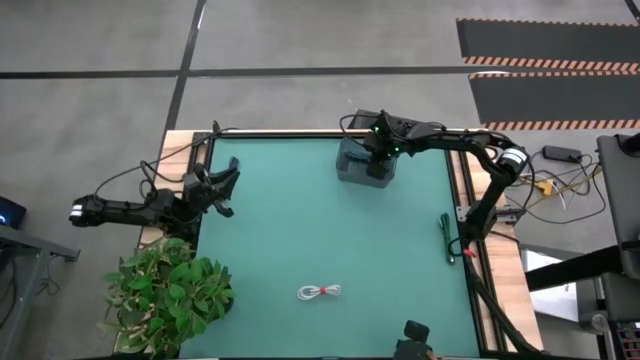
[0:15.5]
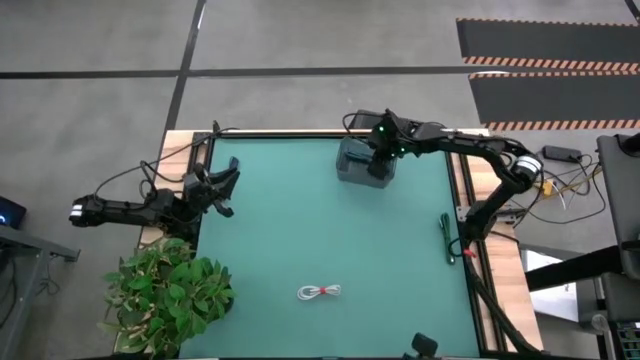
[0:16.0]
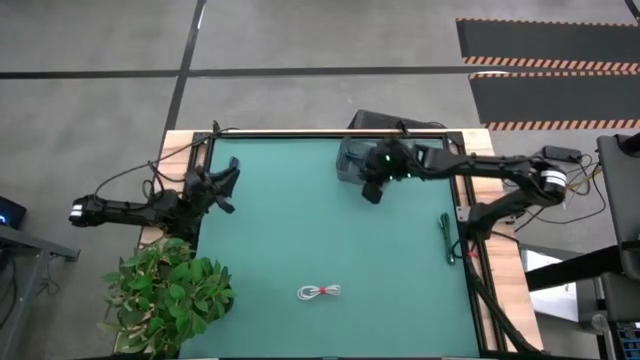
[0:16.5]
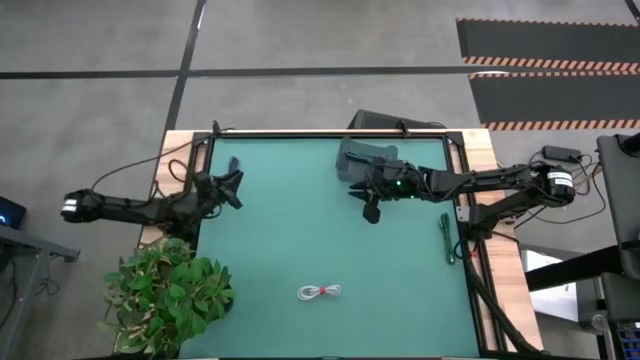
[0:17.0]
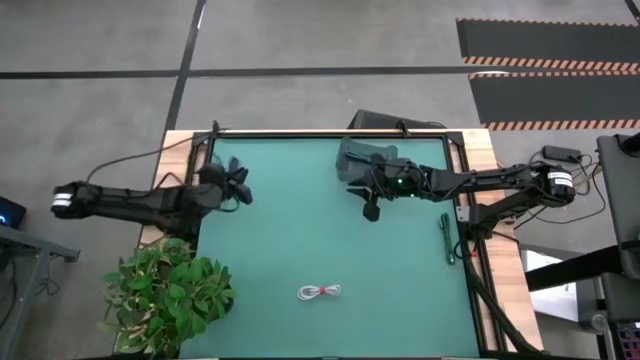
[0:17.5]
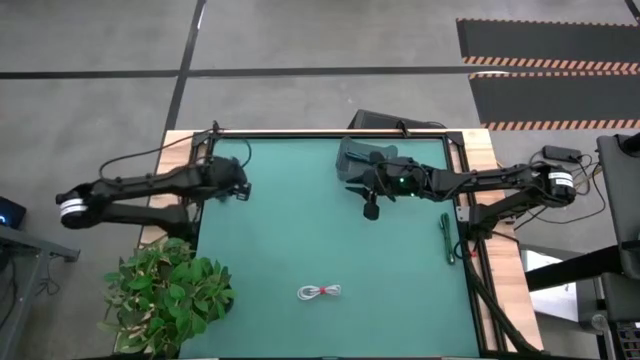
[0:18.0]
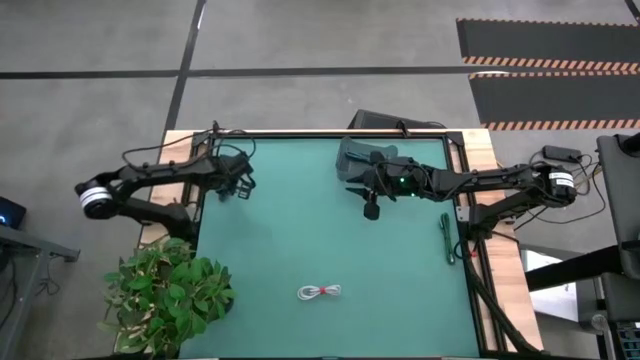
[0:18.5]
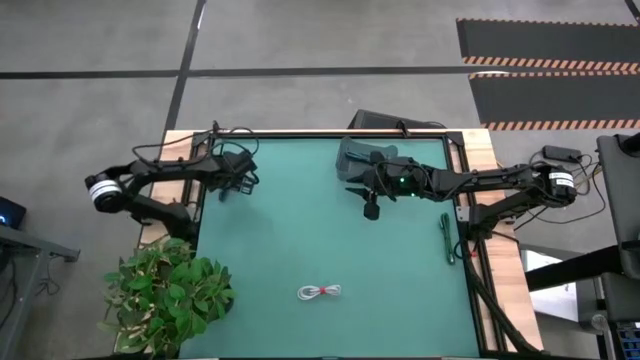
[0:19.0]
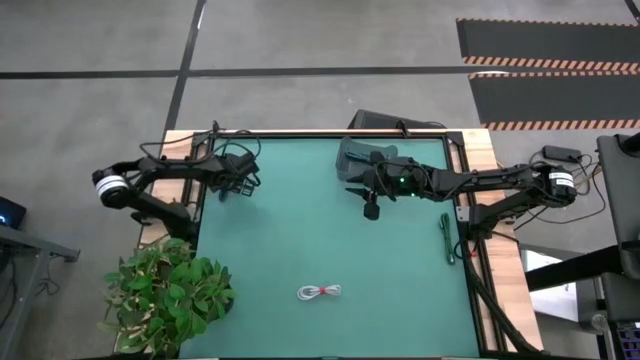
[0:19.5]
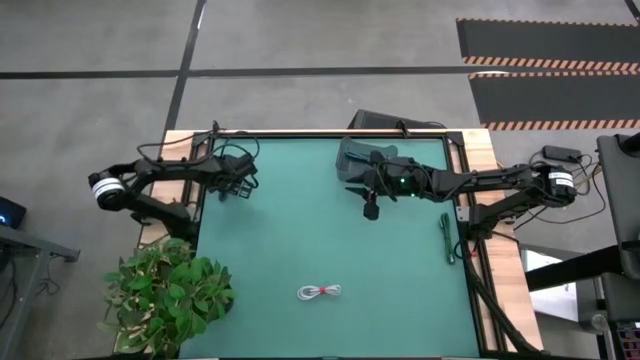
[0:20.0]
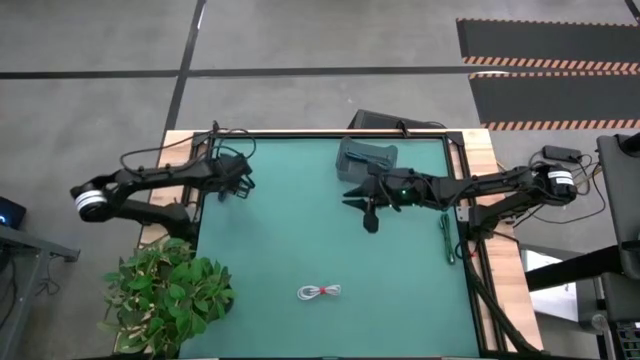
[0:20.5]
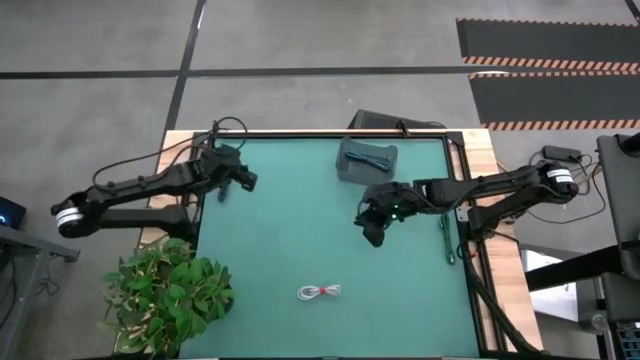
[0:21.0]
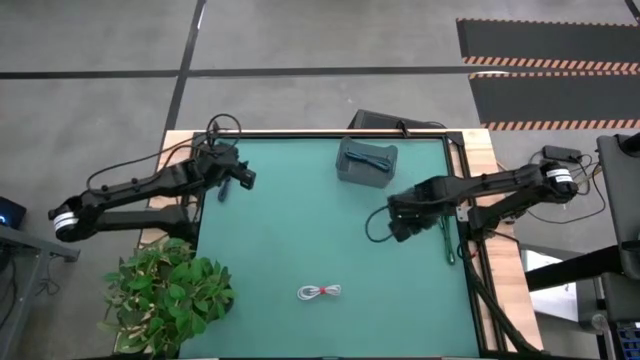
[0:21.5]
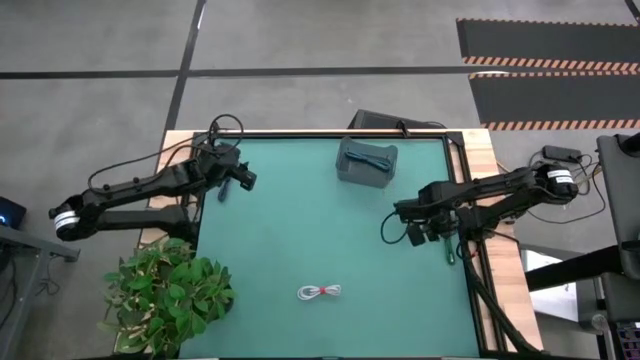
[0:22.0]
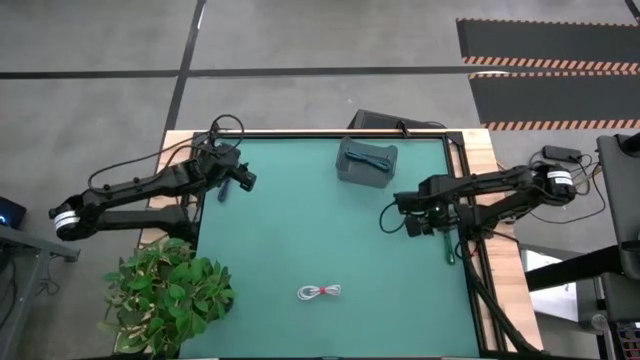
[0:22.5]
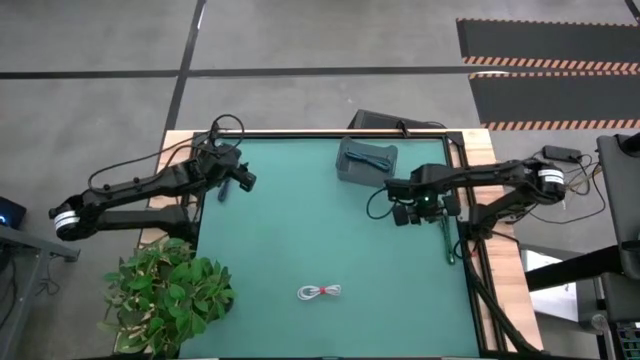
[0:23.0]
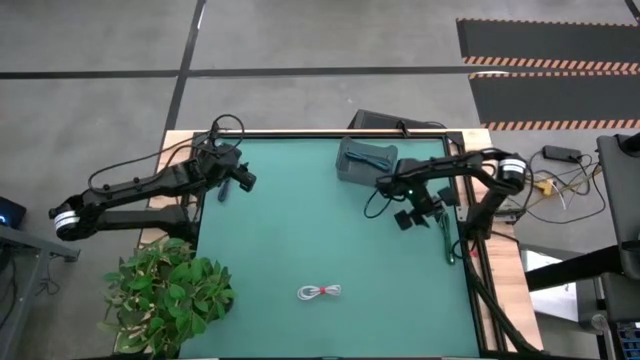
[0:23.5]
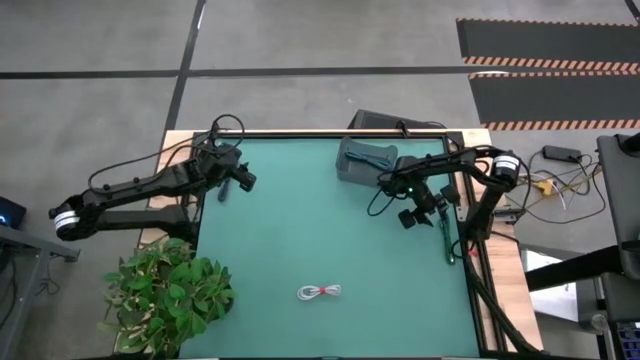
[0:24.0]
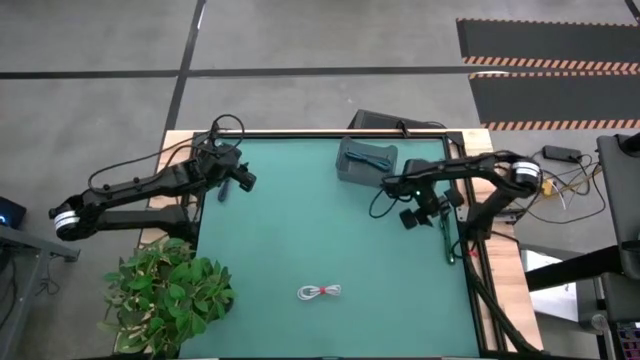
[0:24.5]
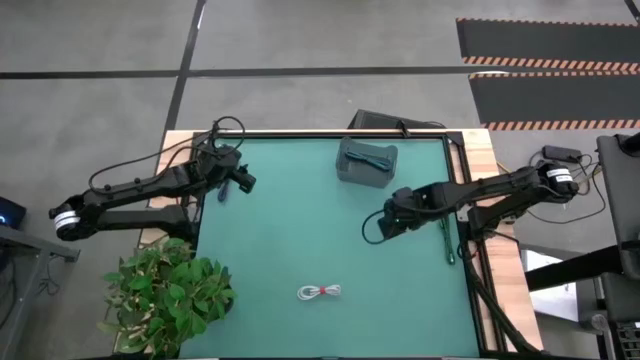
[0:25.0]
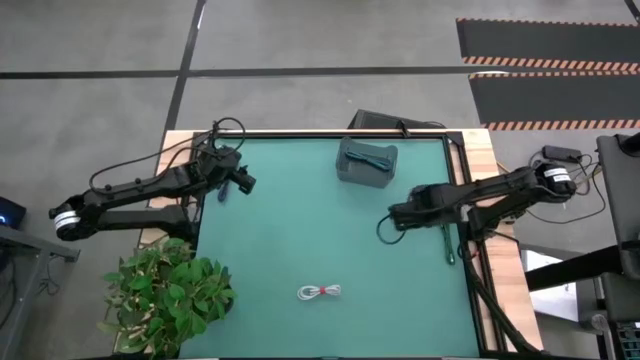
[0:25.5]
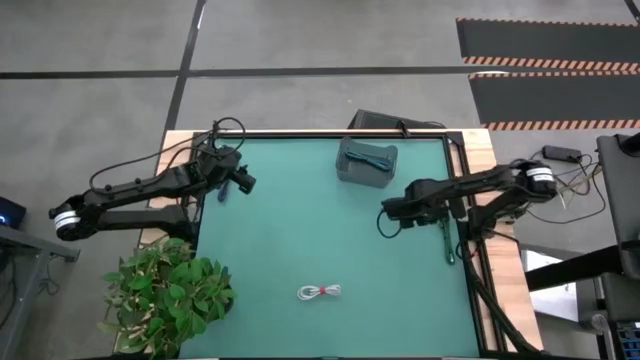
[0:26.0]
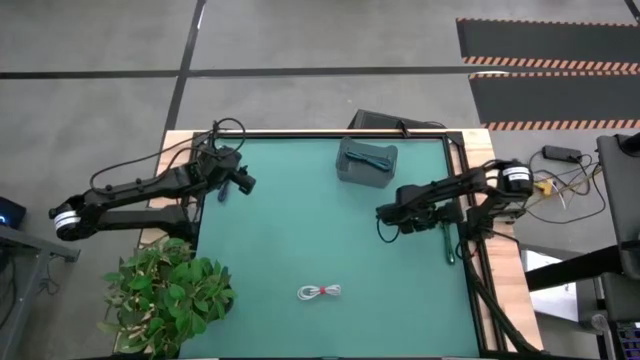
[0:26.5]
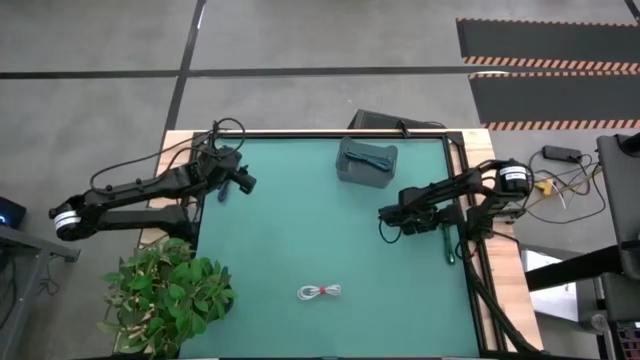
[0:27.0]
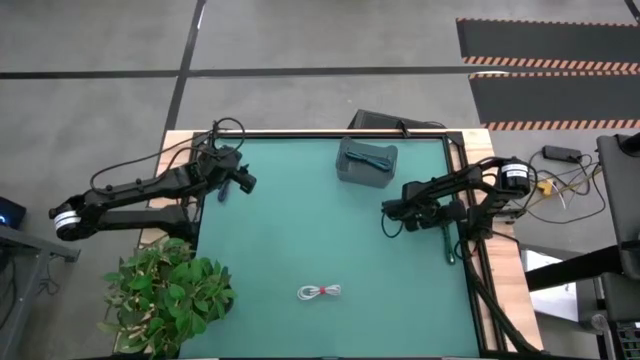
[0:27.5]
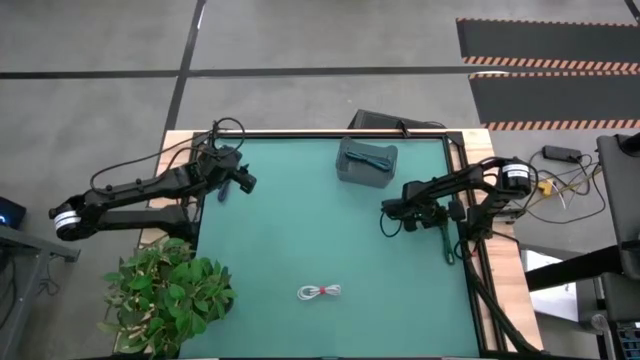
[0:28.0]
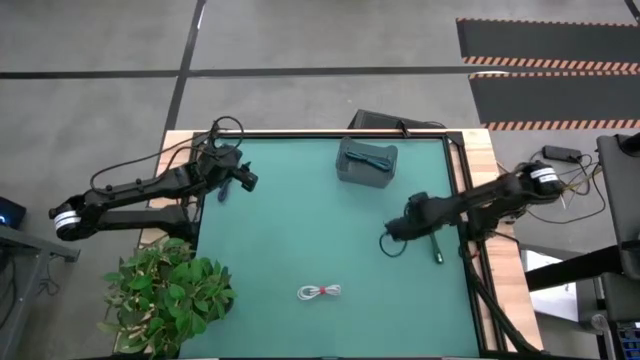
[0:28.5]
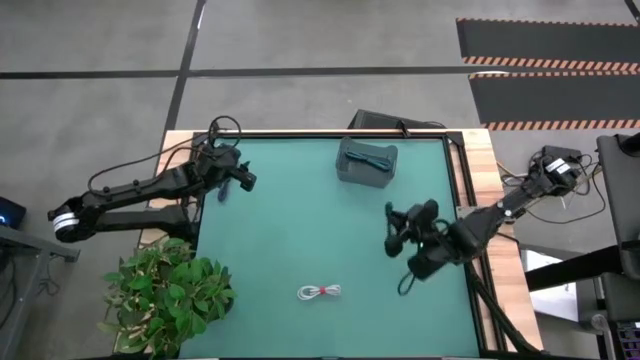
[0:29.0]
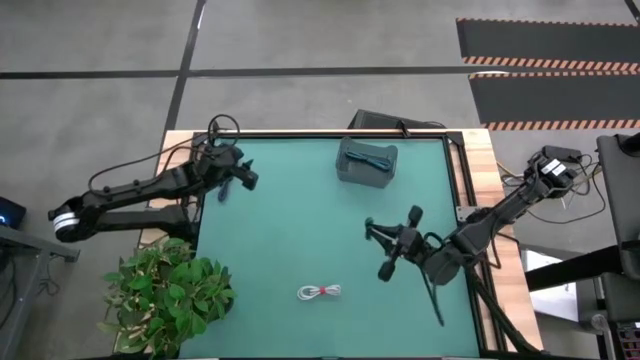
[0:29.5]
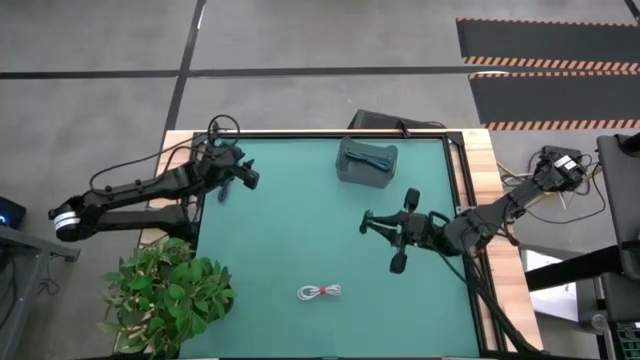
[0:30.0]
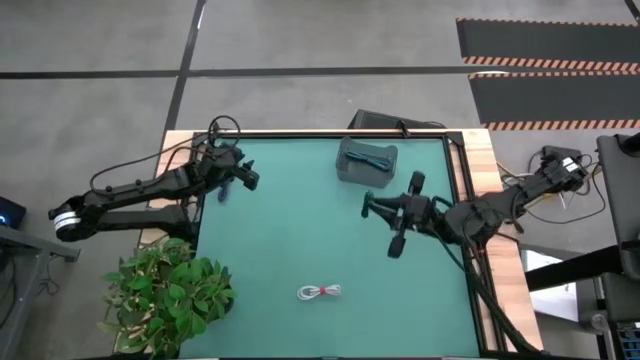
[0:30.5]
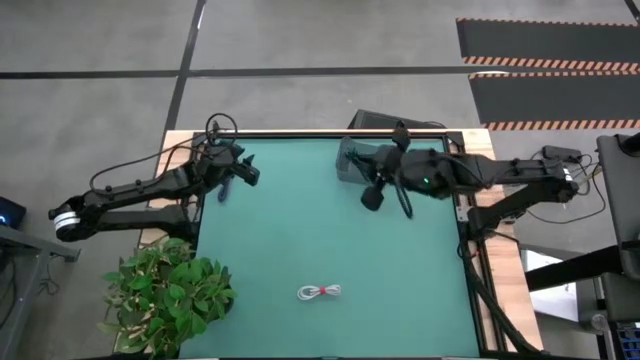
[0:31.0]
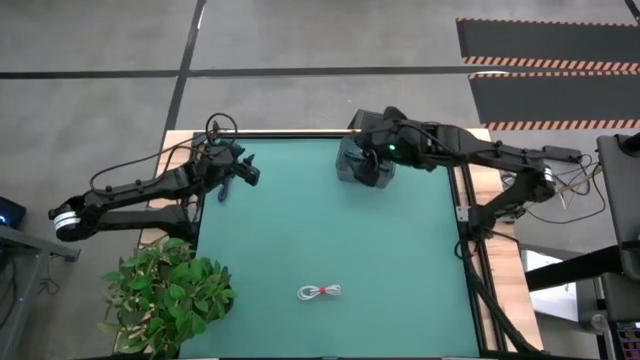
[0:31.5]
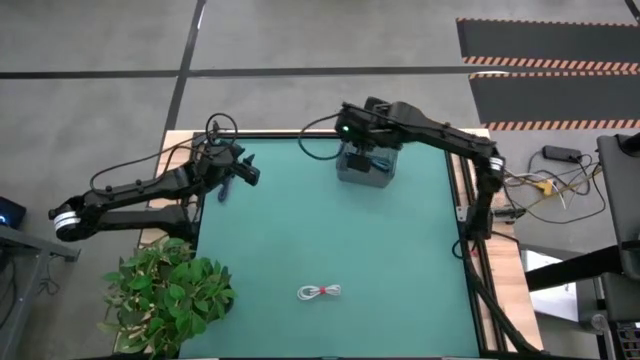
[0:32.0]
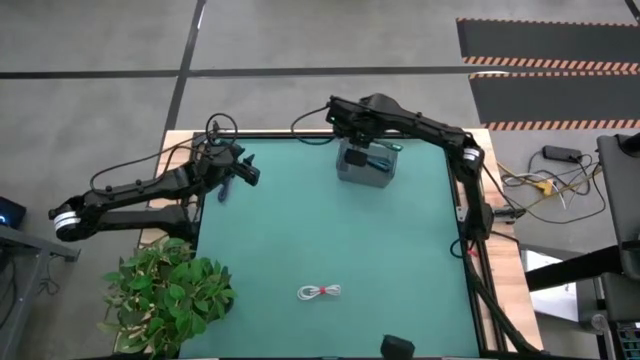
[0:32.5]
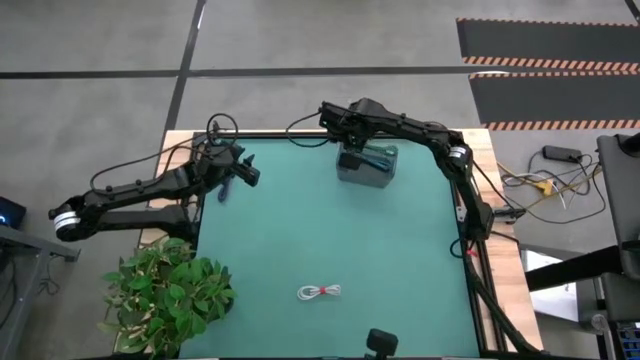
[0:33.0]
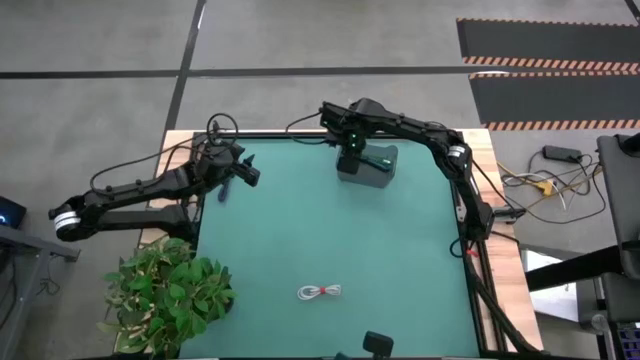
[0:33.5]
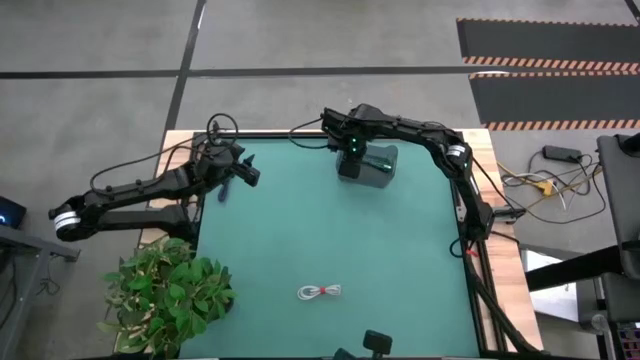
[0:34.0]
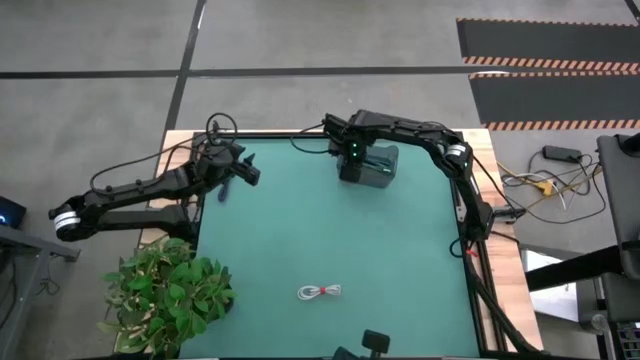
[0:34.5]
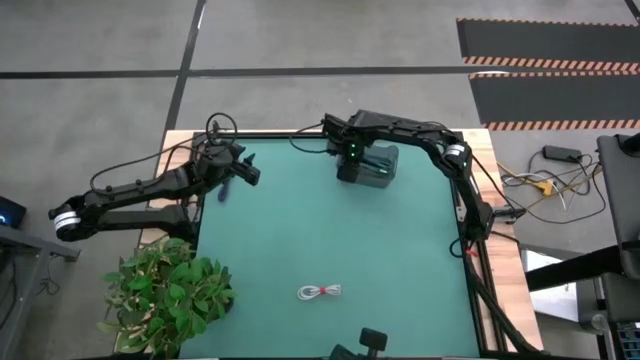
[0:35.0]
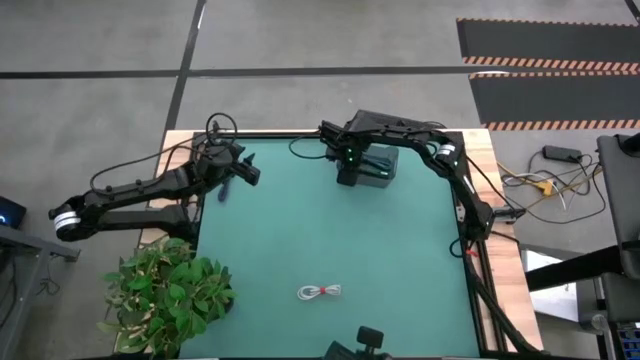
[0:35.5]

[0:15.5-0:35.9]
Task: Pick and place USB-C Cables
Put the green USB cable into the black bin
